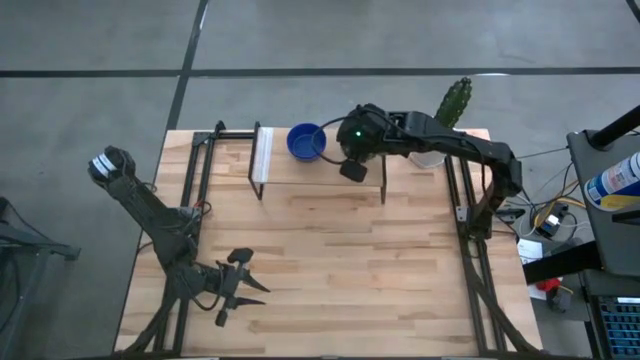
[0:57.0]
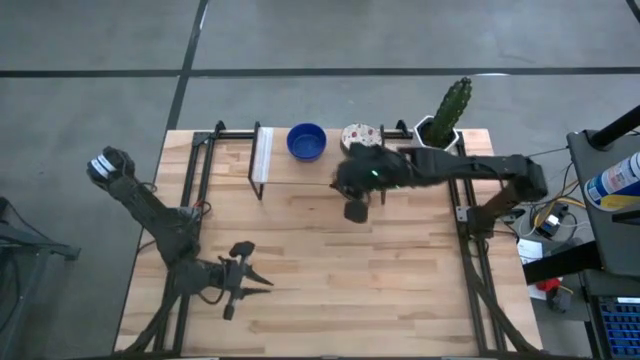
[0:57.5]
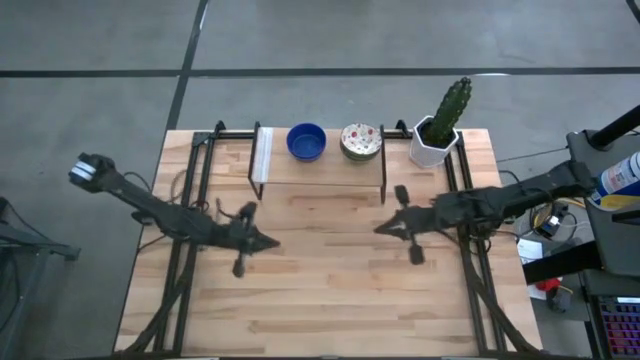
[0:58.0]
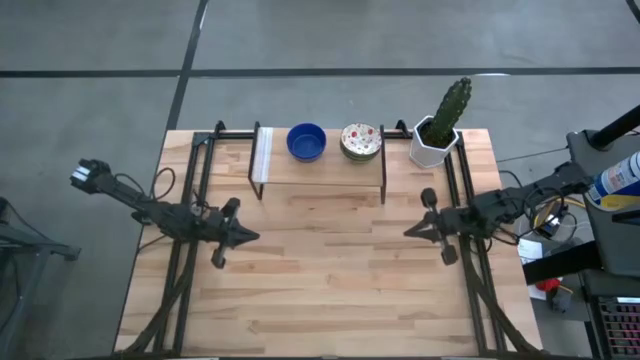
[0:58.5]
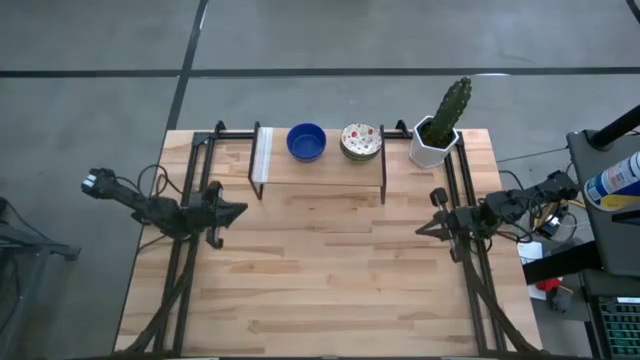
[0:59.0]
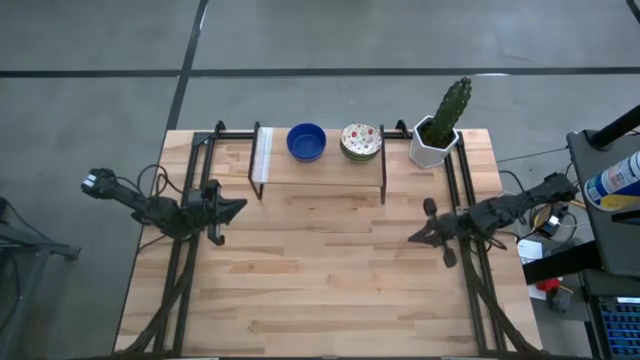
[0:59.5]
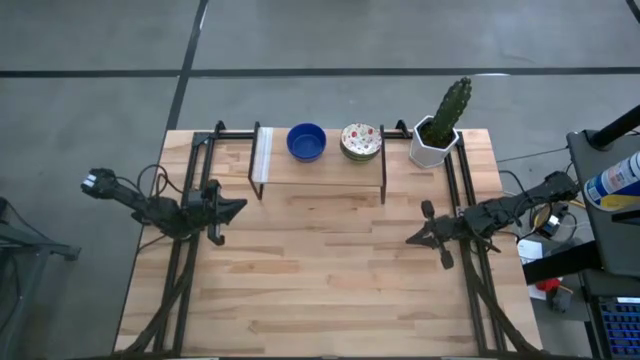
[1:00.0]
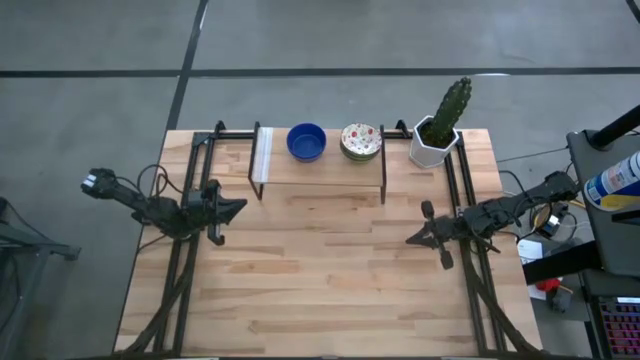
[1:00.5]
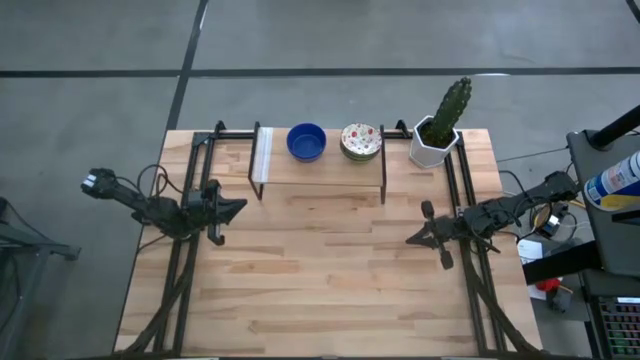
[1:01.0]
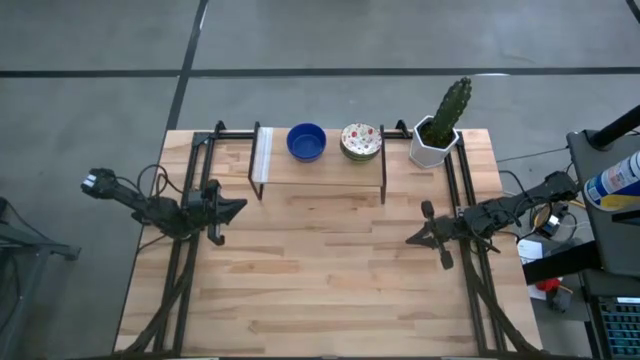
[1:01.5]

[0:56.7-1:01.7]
Task: Pick & Place Mini bowls
Return to Home Position

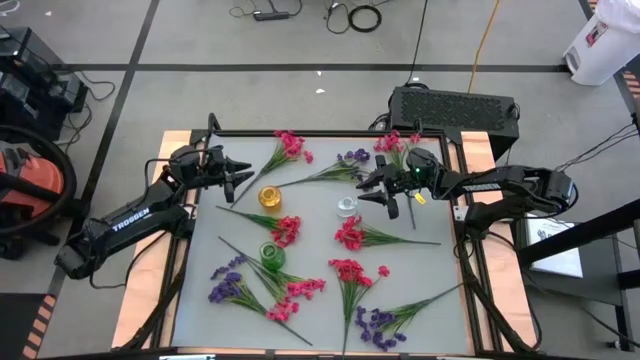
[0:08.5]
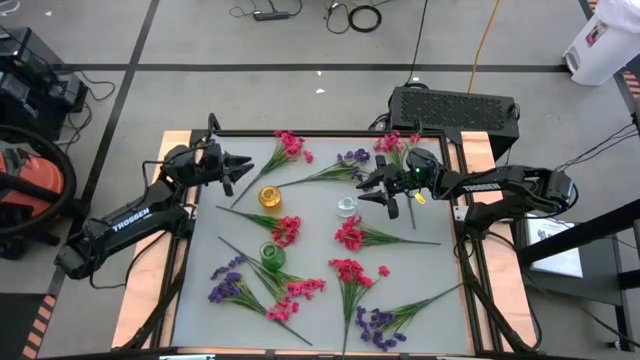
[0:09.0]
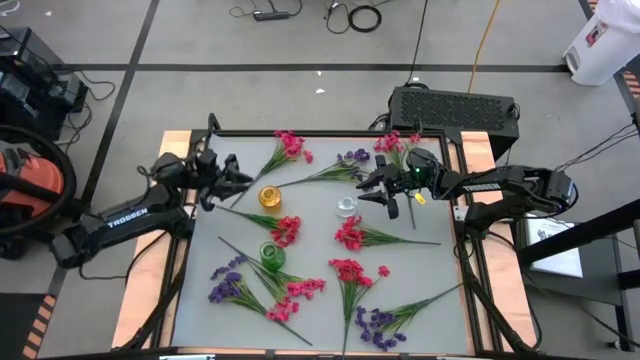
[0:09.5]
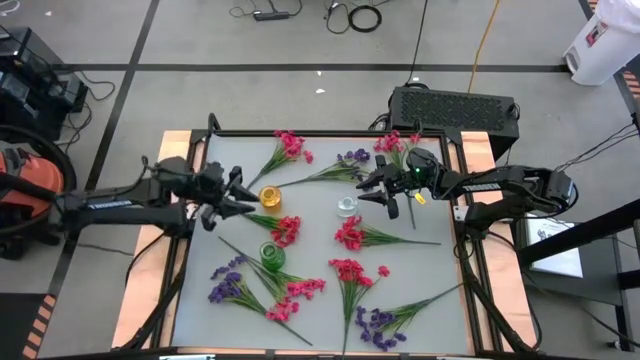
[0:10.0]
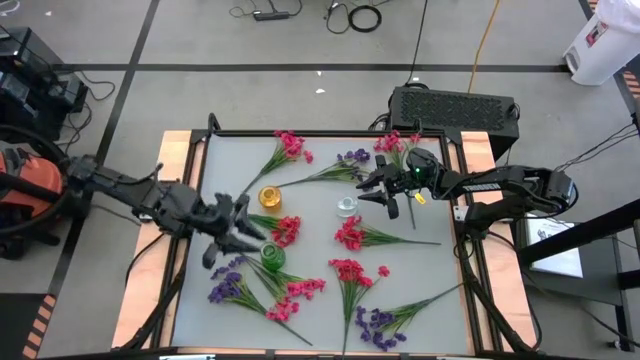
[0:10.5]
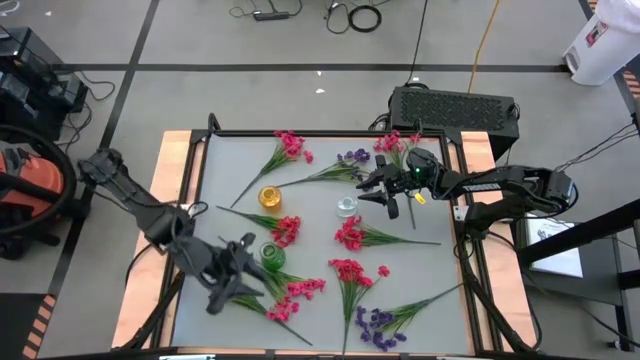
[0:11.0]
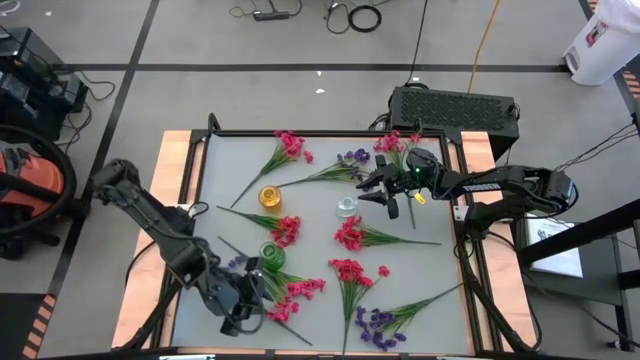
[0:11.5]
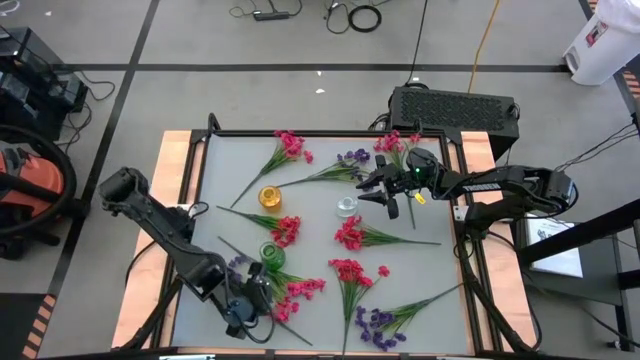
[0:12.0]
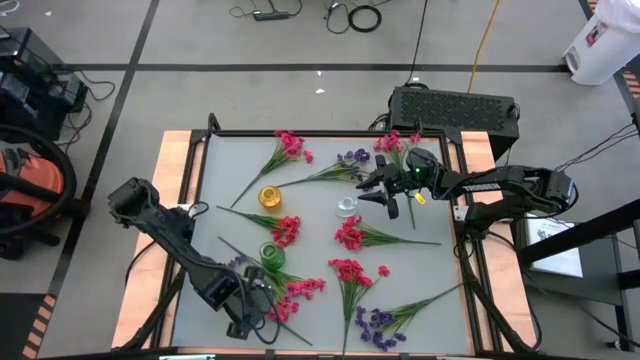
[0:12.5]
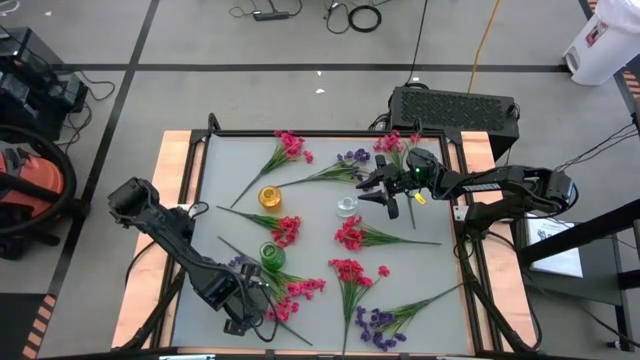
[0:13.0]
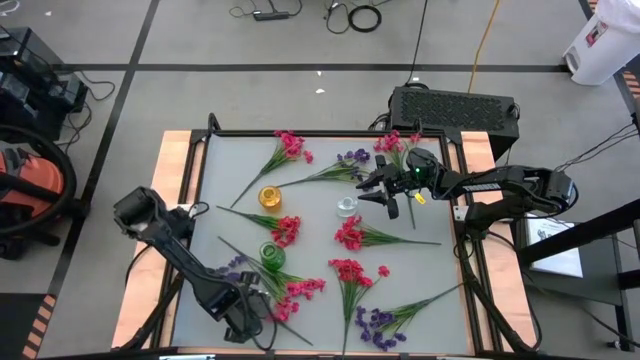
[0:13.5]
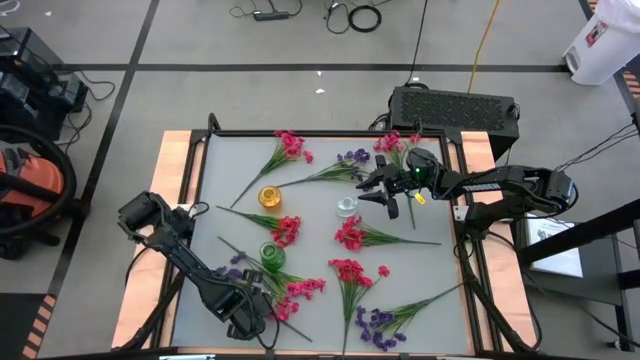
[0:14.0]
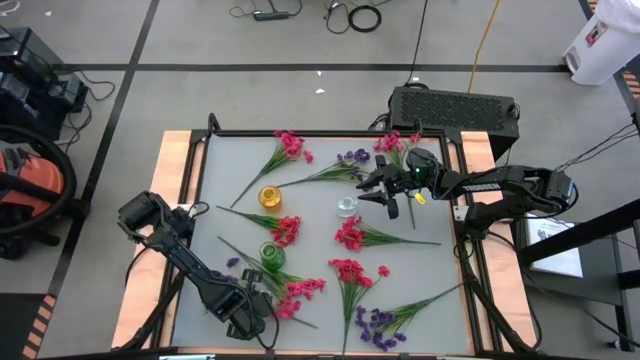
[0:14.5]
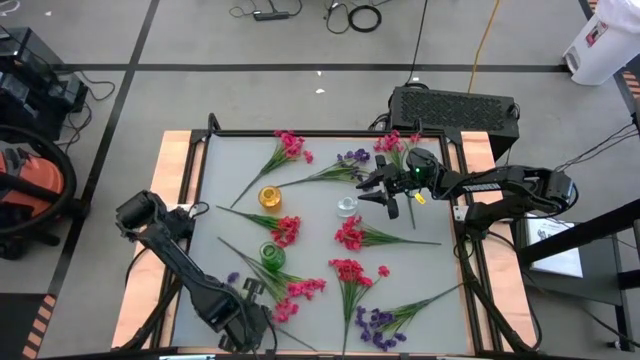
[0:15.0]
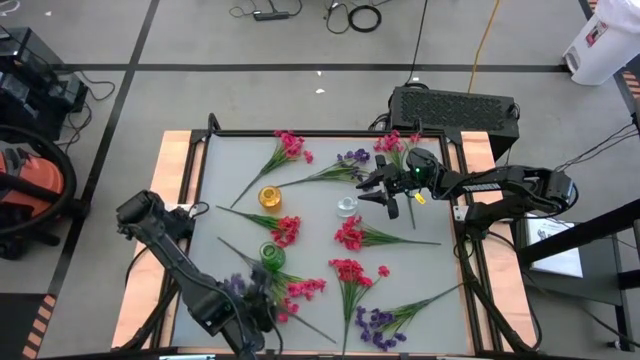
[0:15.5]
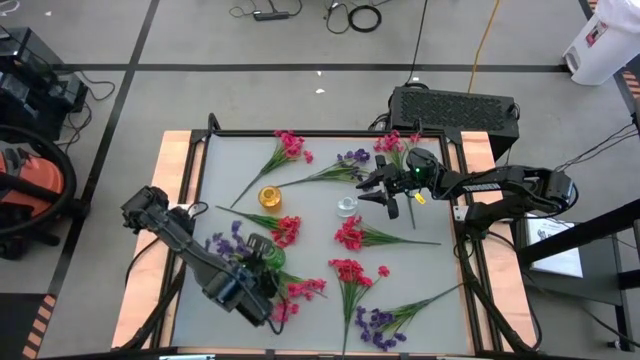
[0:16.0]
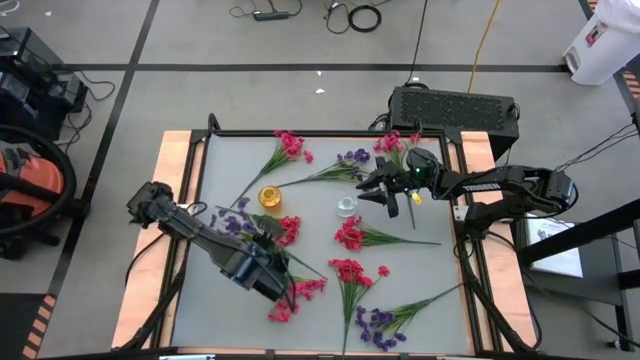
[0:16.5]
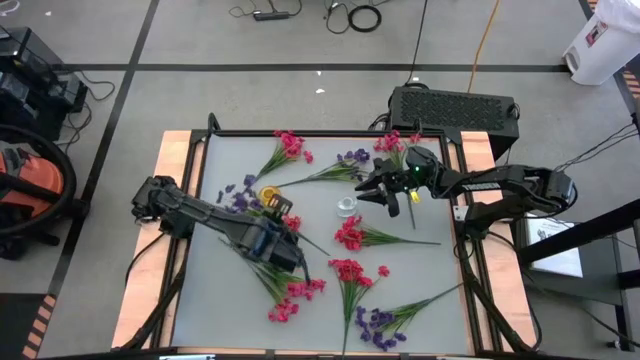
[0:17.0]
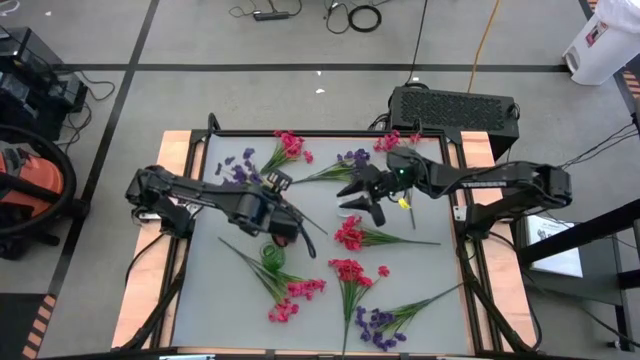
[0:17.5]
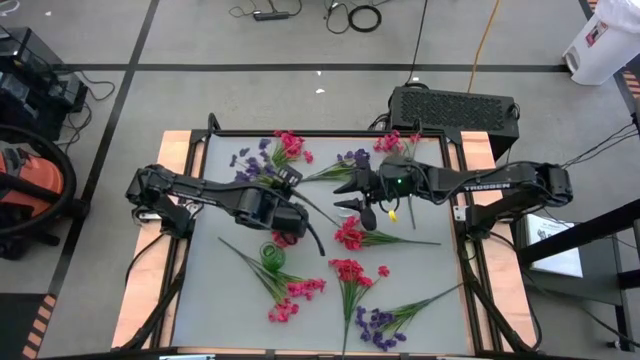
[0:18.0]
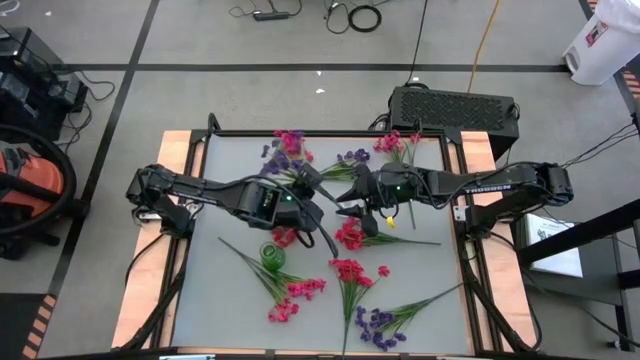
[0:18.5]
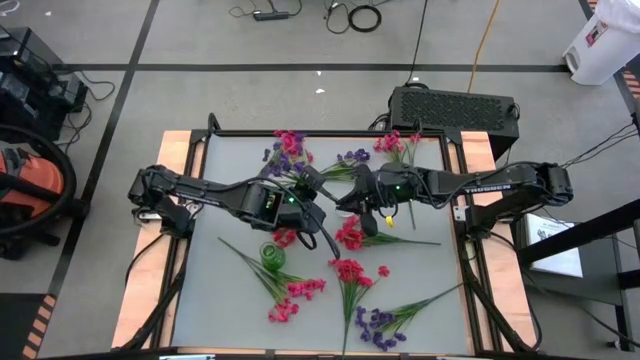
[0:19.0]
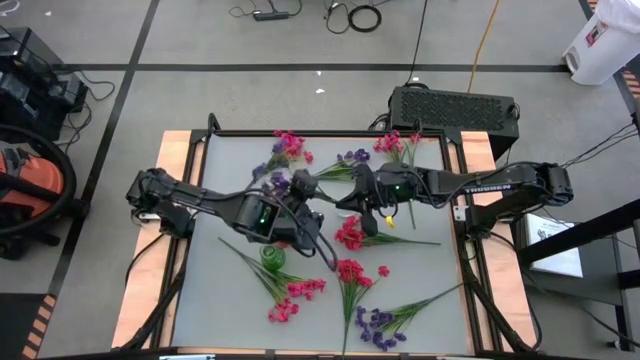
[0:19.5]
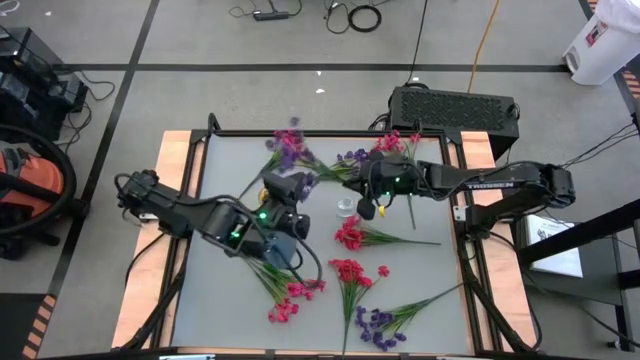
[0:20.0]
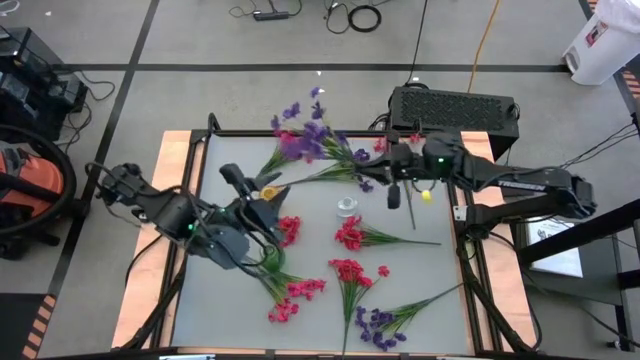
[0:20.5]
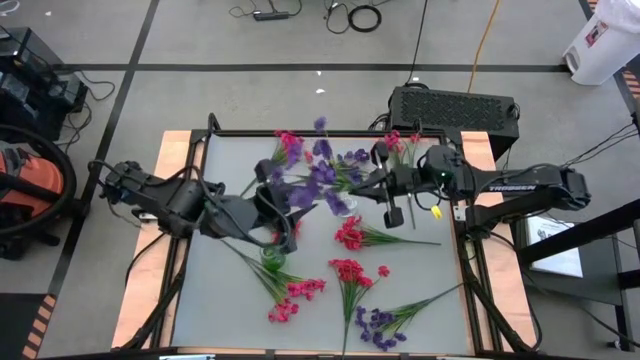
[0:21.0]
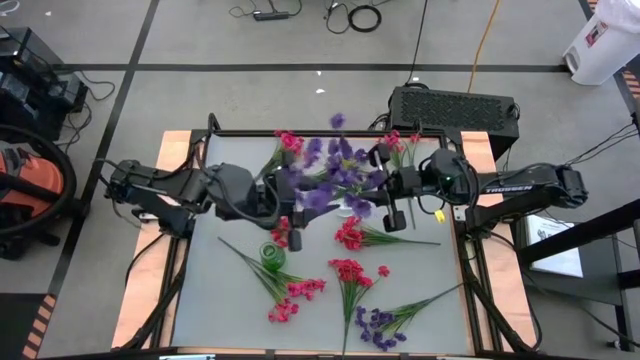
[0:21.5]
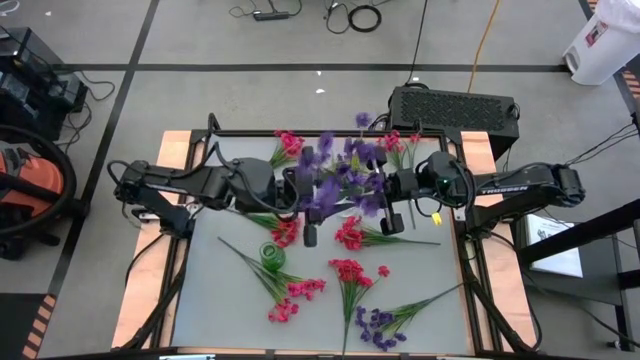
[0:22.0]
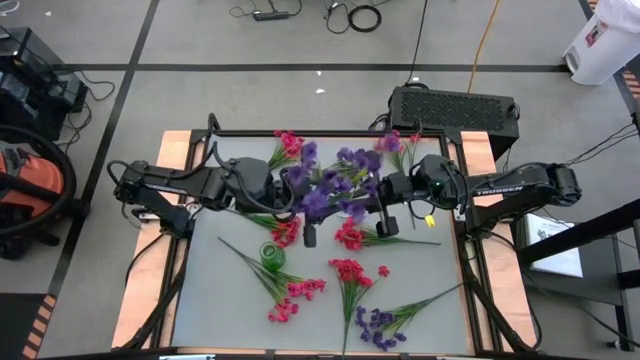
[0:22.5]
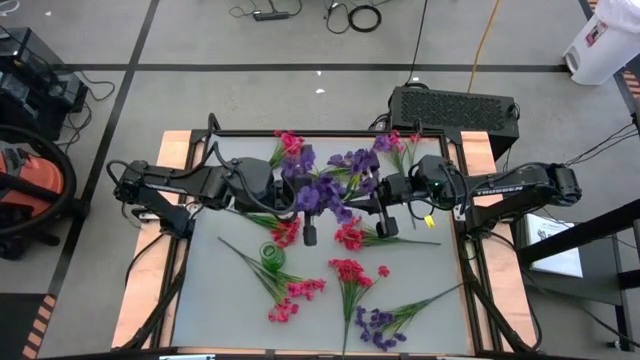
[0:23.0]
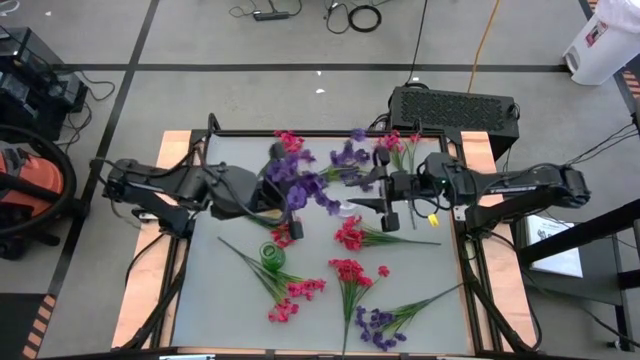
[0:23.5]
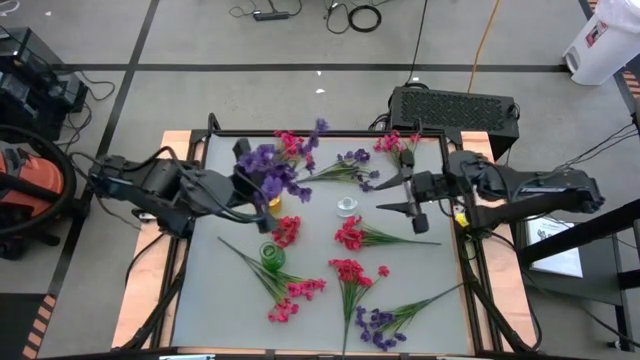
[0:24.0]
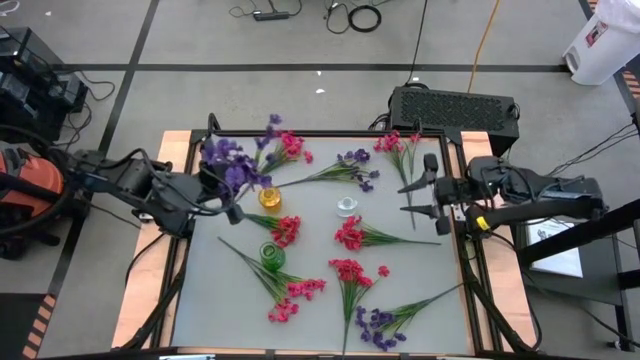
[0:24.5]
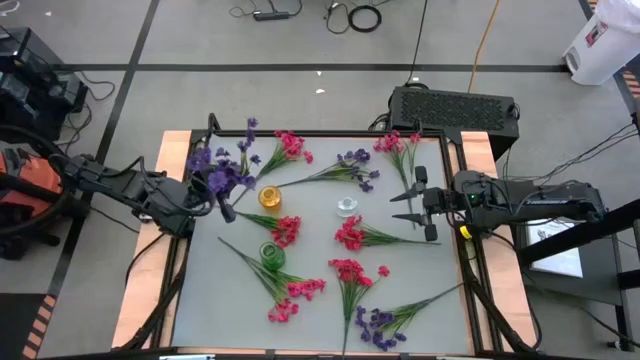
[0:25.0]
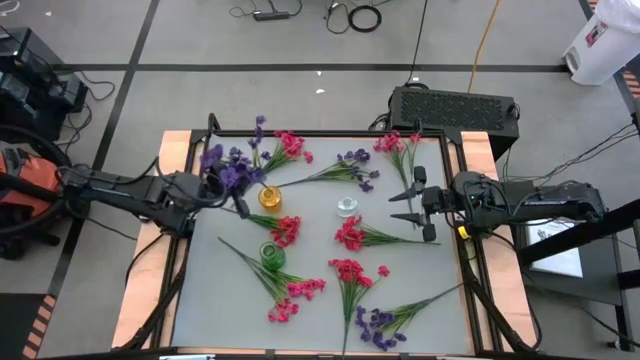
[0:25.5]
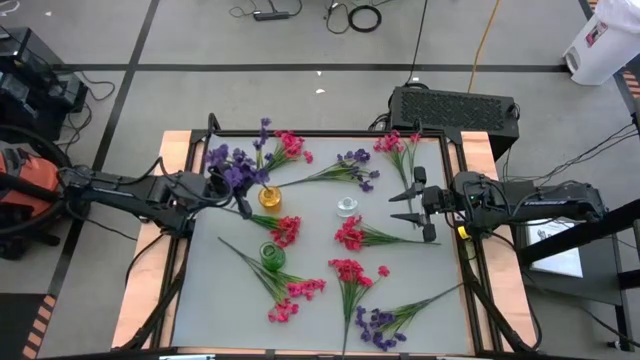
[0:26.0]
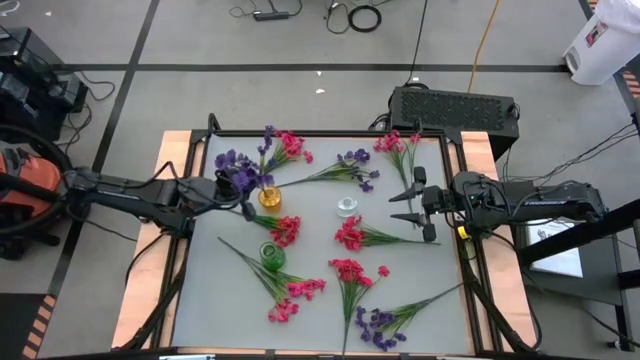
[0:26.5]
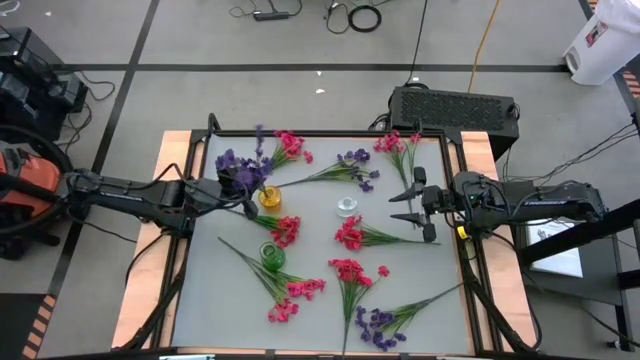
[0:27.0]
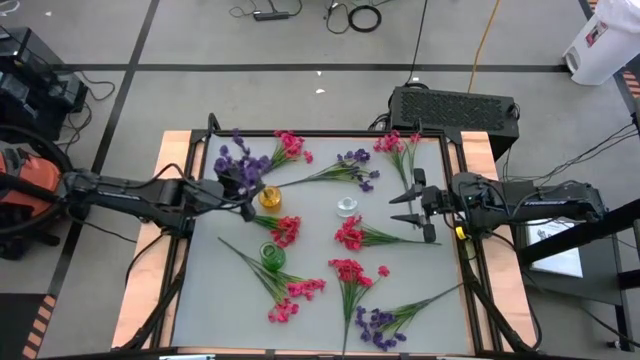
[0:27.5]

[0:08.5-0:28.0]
Task: Sort flowers into vase by color
Put the bottom left violet flowers into the yellow vase
